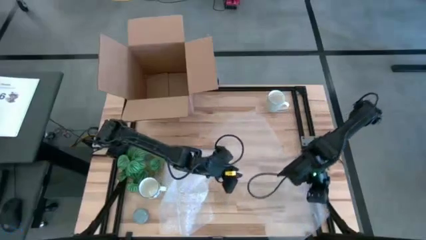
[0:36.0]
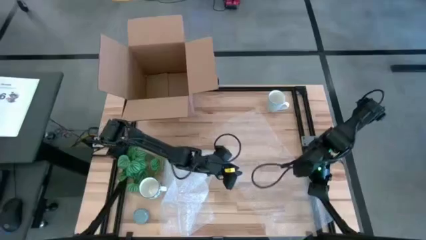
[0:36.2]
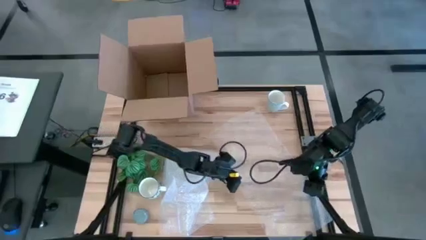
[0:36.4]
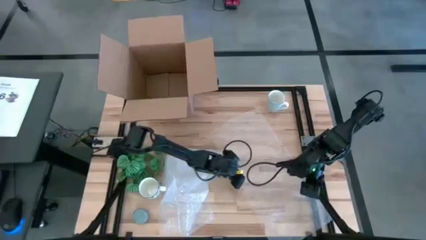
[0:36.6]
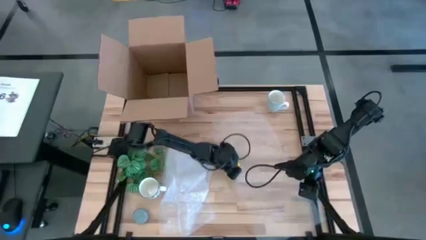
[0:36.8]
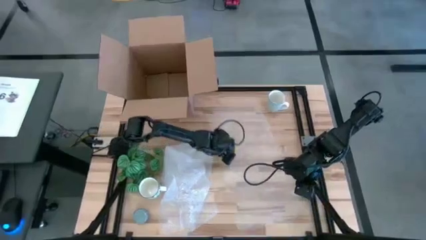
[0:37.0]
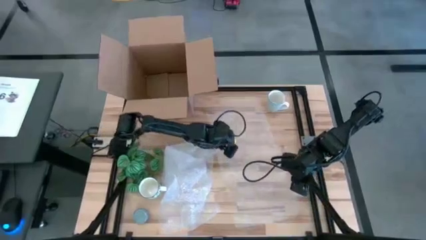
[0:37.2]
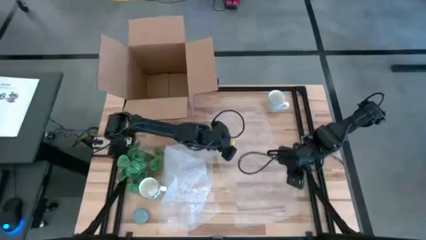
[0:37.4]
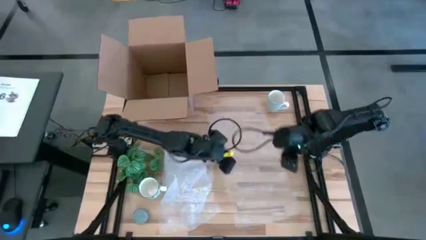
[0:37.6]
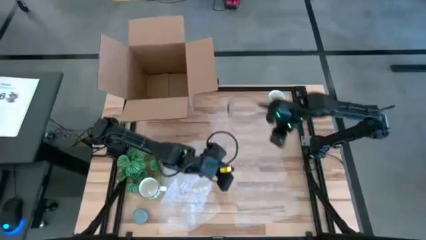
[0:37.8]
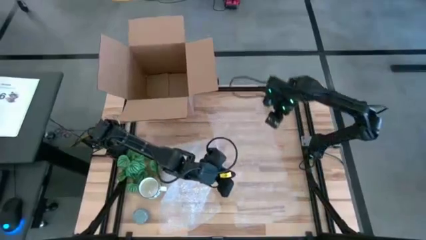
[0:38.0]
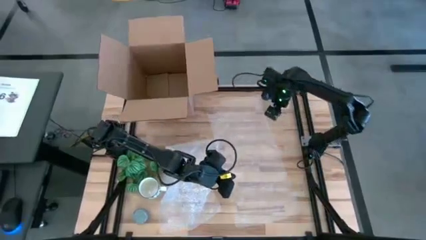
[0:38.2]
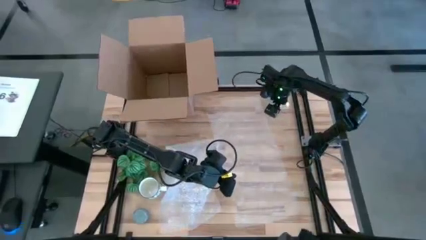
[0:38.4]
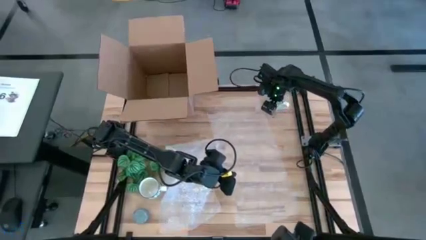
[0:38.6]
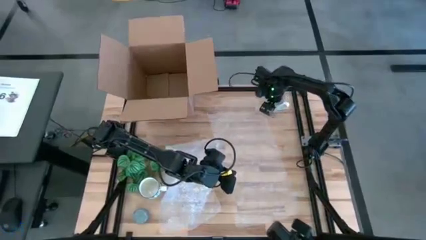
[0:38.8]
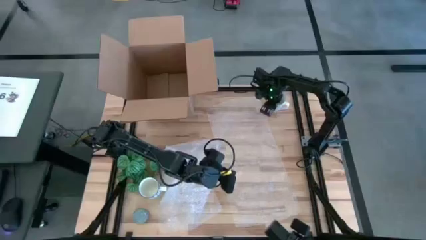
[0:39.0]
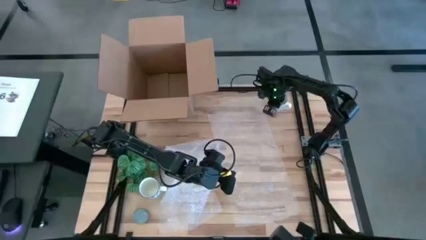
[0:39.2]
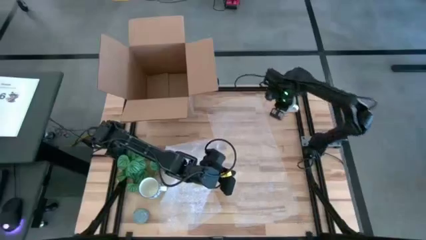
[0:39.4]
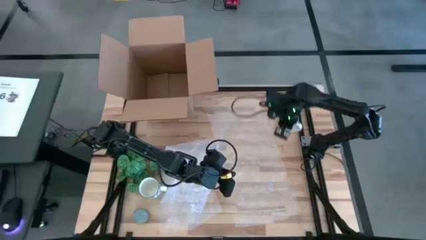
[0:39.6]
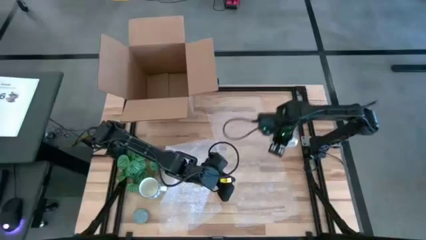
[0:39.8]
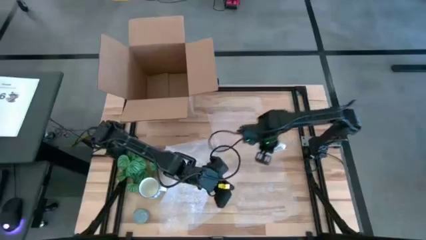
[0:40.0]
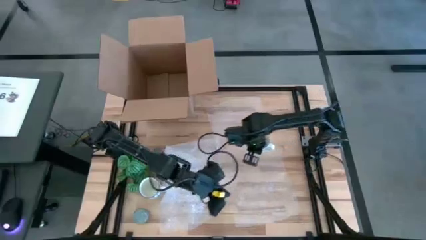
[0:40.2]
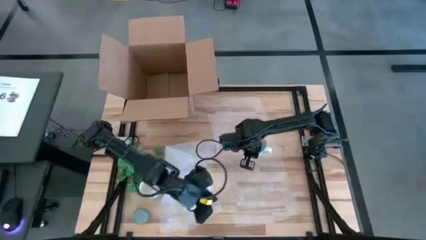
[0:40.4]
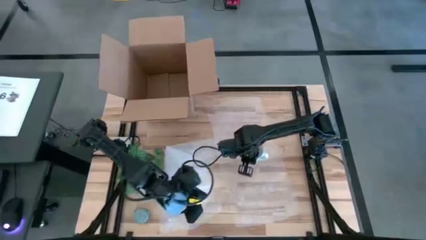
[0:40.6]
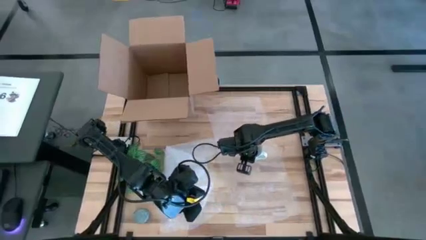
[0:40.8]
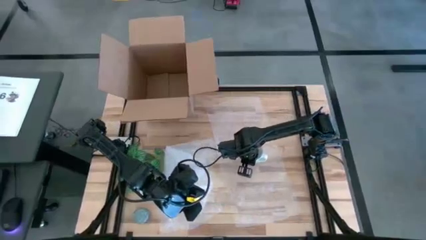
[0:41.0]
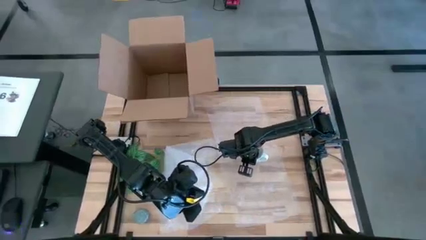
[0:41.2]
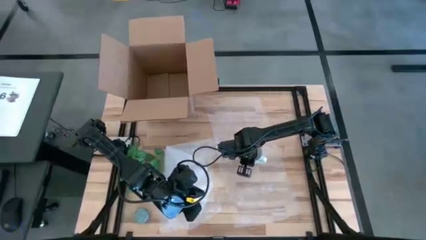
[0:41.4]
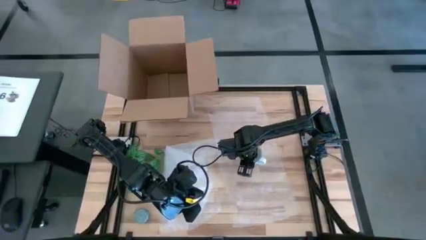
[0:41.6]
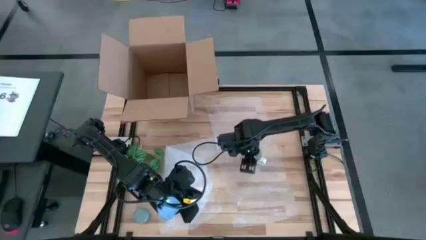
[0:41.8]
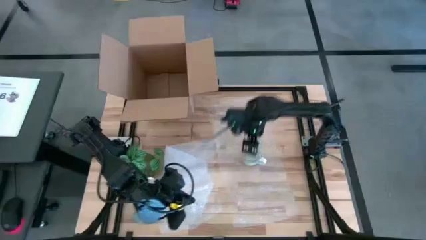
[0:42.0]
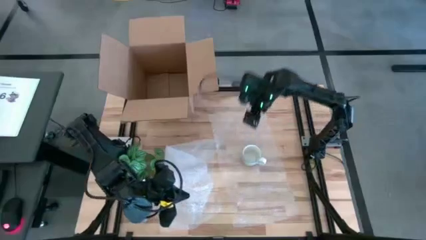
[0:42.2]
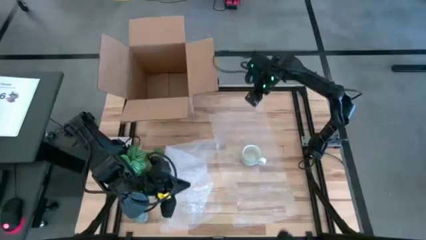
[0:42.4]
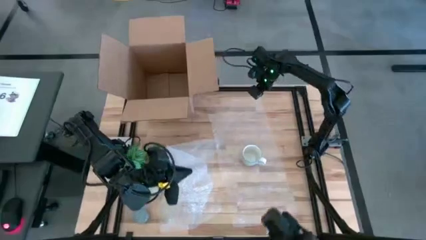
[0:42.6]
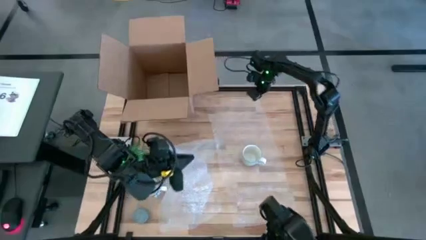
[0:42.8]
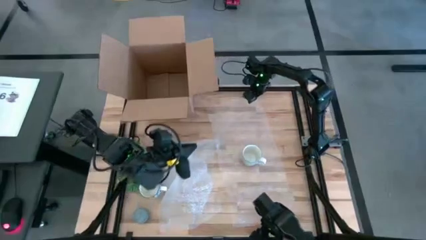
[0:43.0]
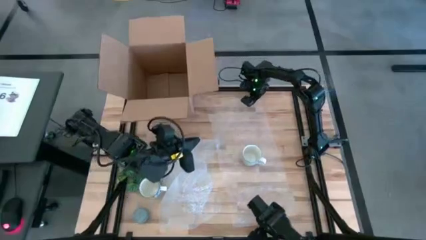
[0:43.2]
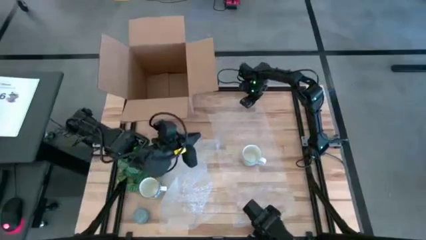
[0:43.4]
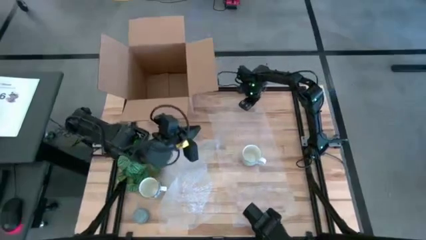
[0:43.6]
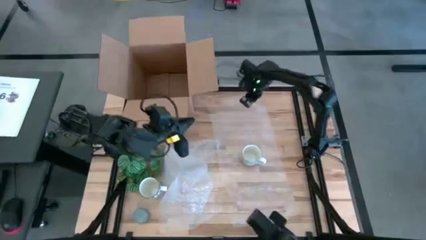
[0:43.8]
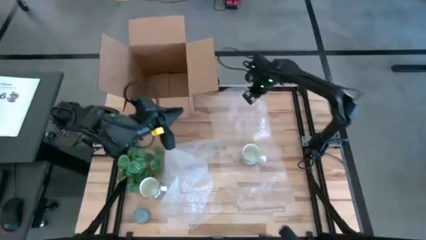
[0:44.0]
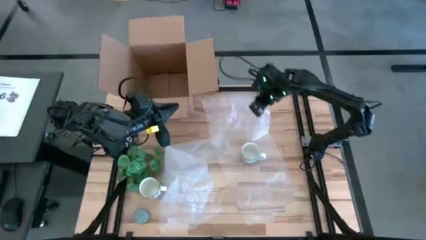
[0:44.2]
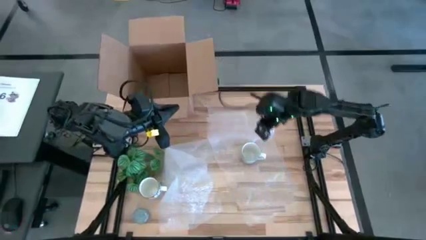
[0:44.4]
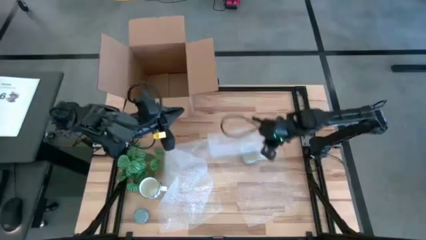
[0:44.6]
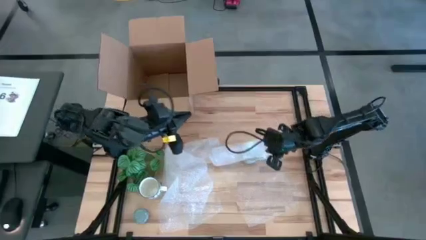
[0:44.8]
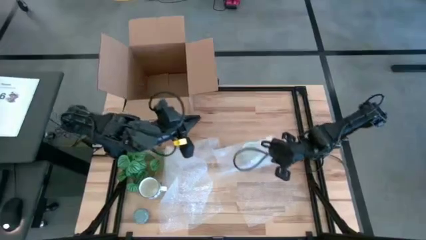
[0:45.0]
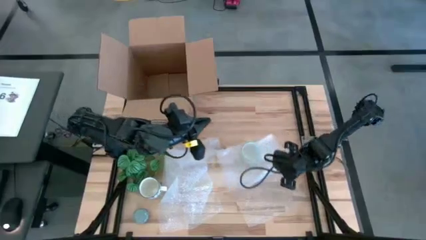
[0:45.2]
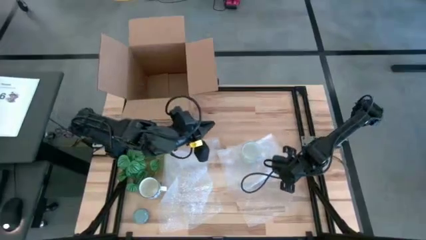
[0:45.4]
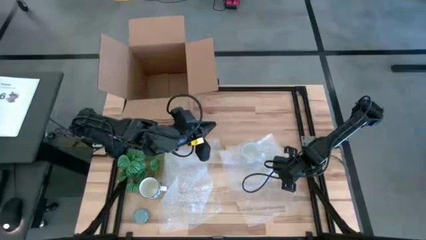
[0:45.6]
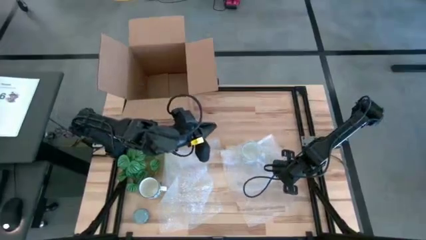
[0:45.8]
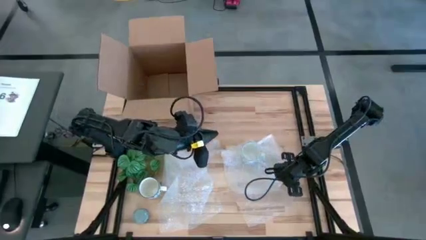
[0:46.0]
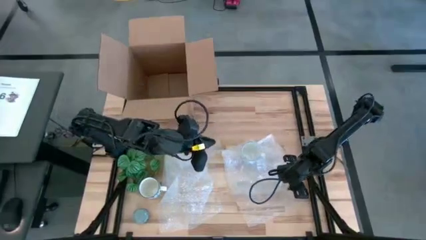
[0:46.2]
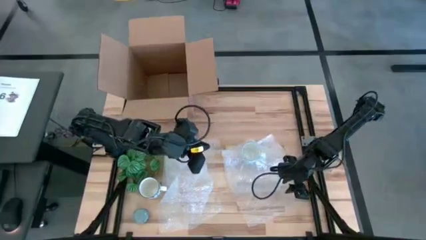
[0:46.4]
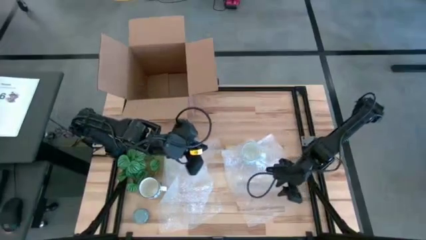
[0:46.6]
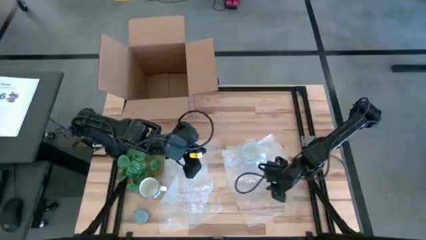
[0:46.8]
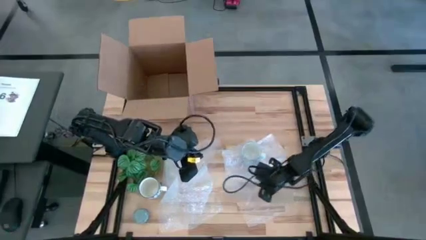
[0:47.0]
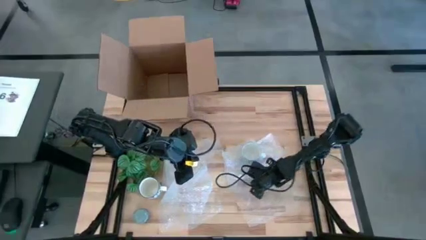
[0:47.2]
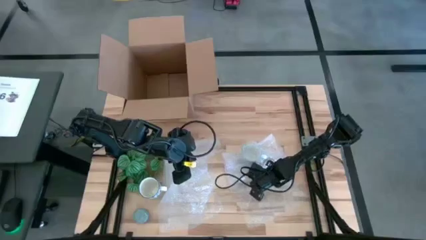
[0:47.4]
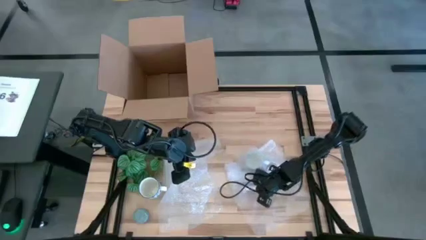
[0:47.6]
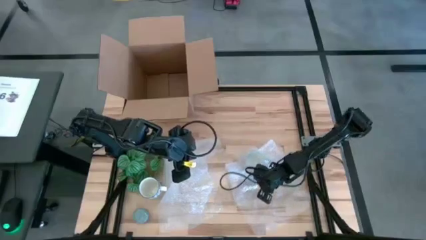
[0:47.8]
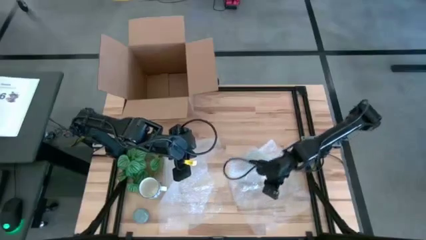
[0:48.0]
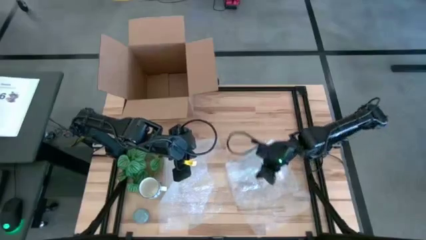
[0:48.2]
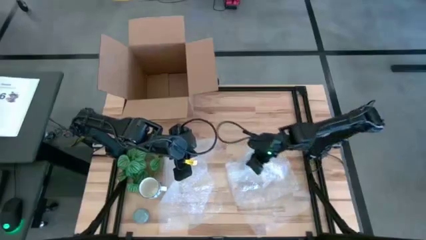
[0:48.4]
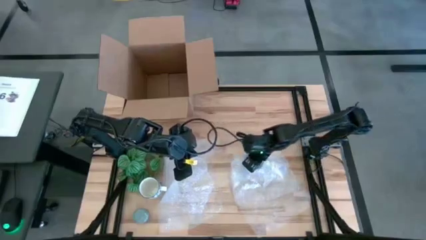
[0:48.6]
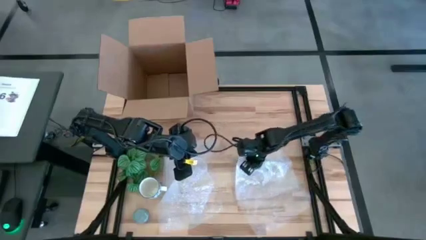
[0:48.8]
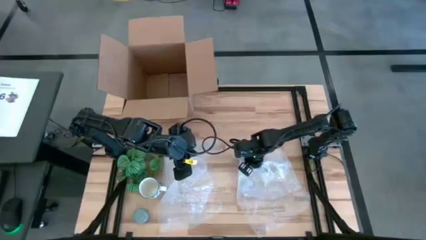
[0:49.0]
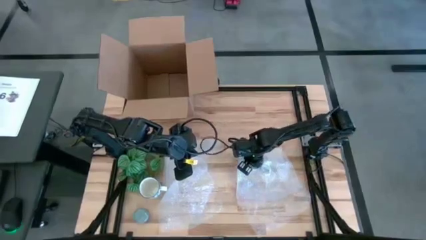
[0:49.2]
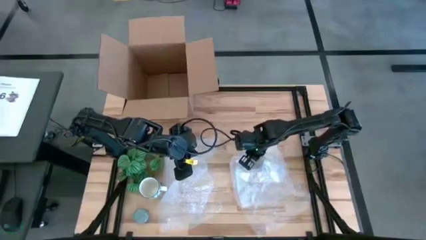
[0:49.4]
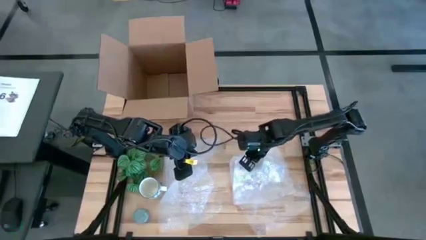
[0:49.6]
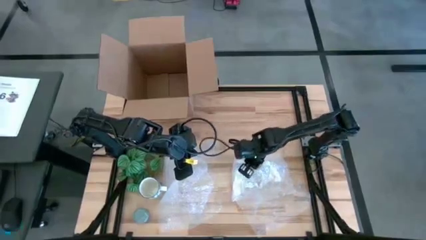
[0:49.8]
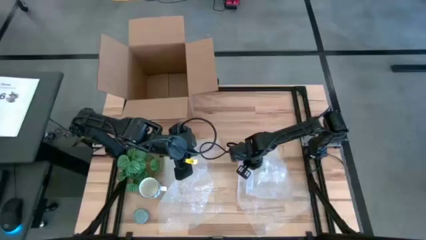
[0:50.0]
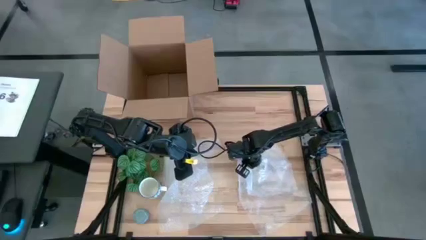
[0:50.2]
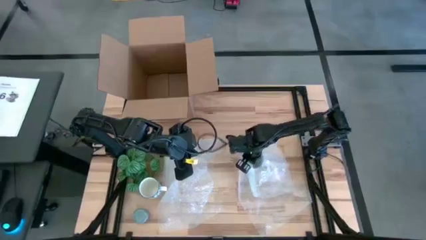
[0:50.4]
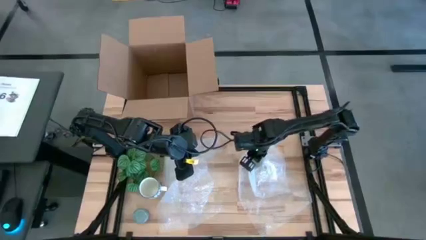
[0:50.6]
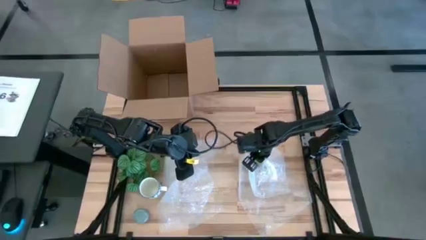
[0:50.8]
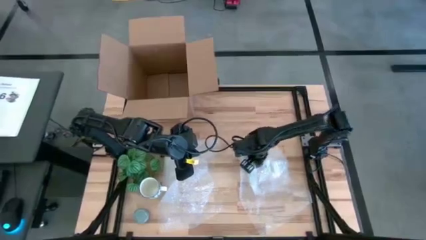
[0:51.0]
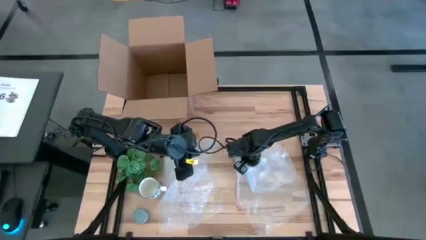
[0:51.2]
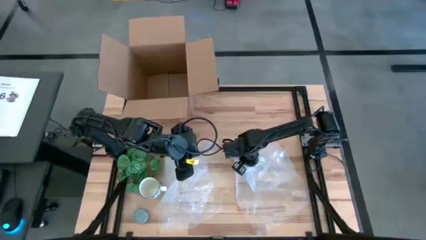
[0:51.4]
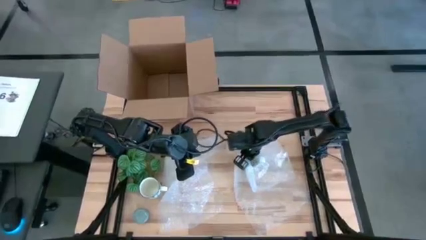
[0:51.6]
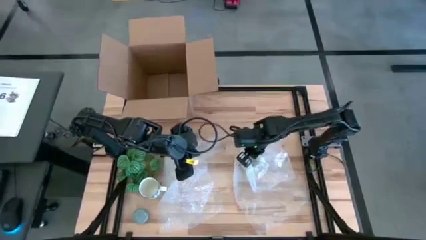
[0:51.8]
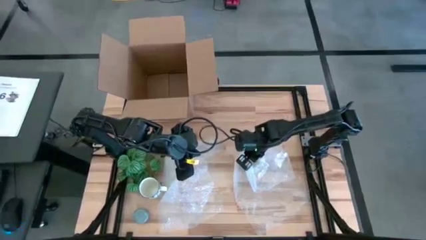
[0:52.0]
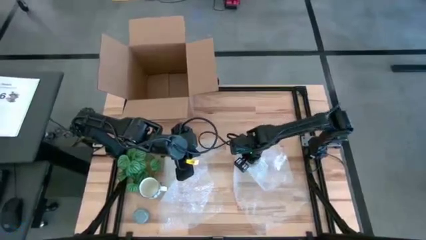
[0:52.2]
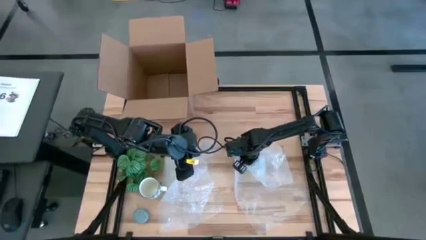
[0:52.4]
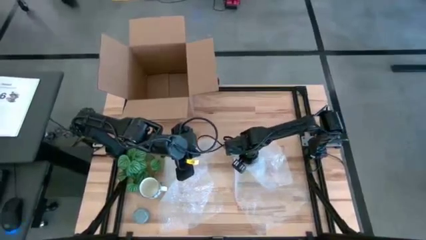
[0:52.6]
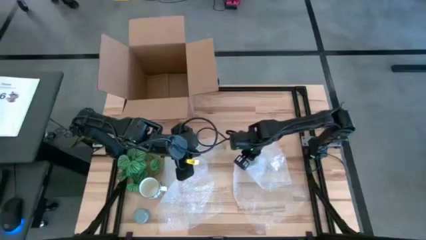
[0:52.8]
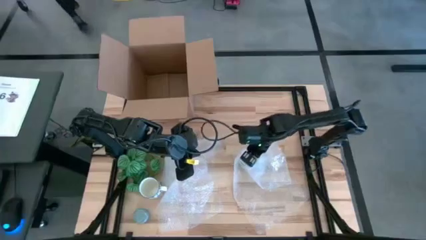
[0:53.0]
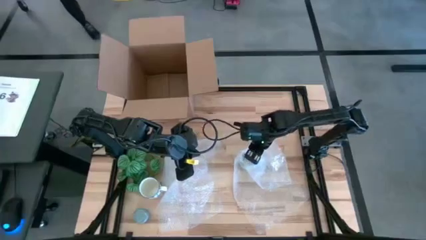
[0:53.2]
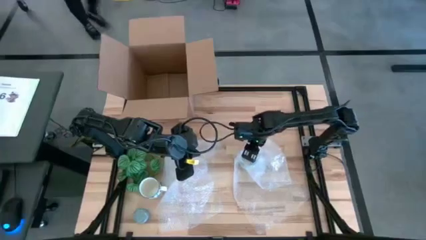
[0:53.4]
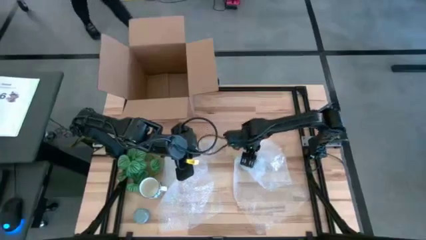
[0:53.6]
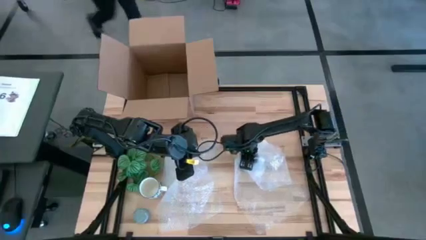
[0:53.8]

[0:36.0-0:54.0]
Task: wrap mug
Wrap the green mug with bubble wrap
